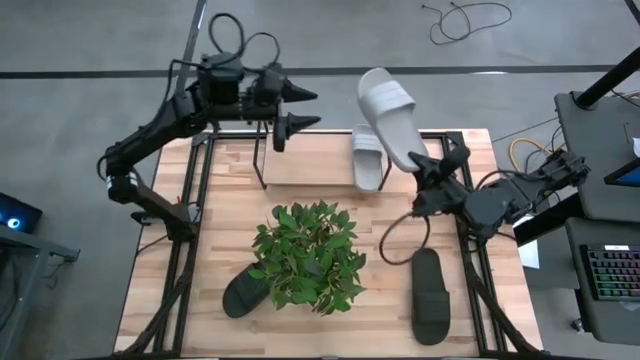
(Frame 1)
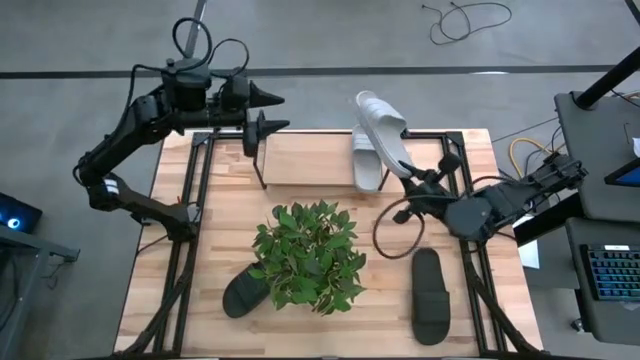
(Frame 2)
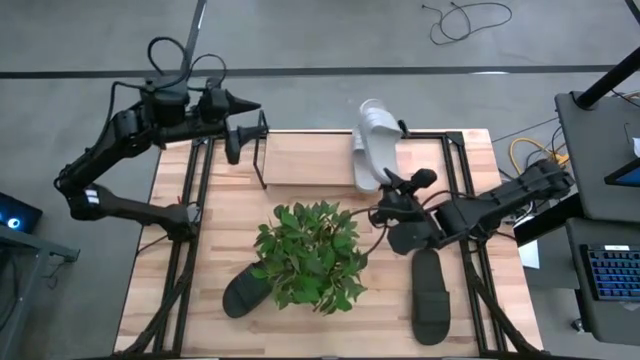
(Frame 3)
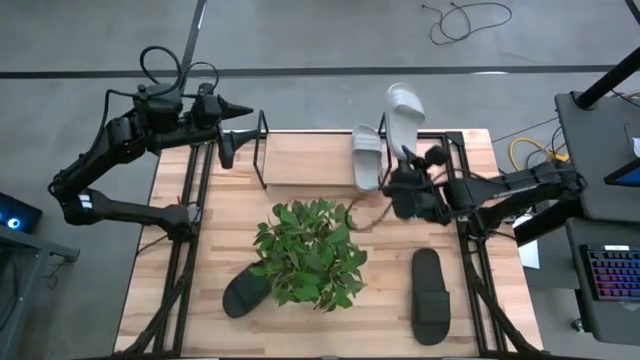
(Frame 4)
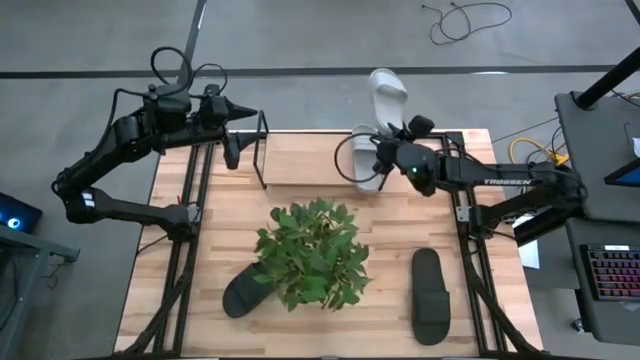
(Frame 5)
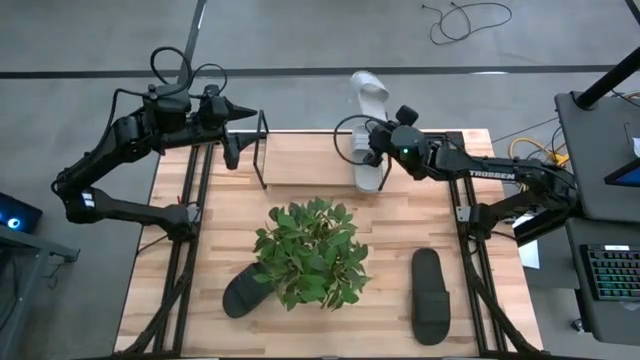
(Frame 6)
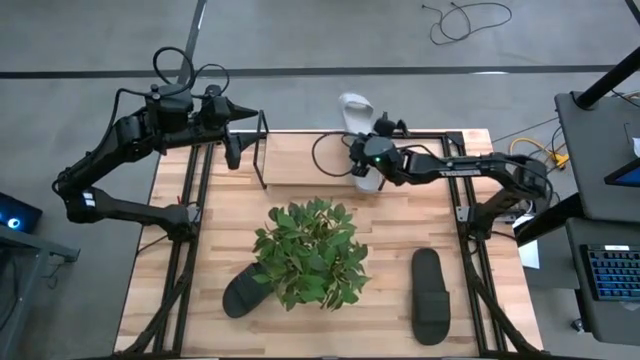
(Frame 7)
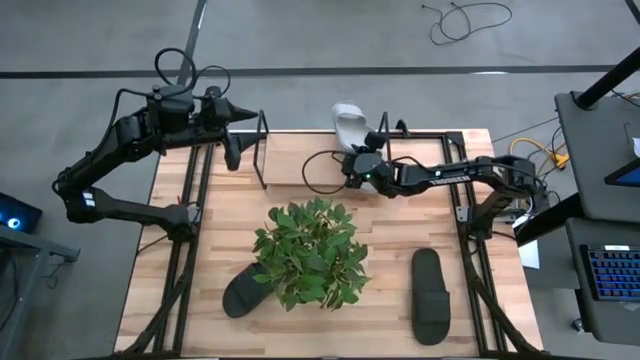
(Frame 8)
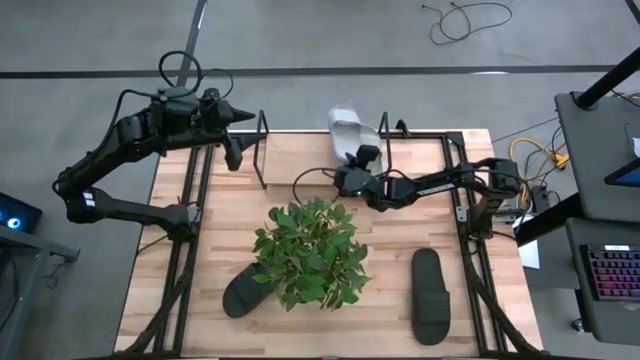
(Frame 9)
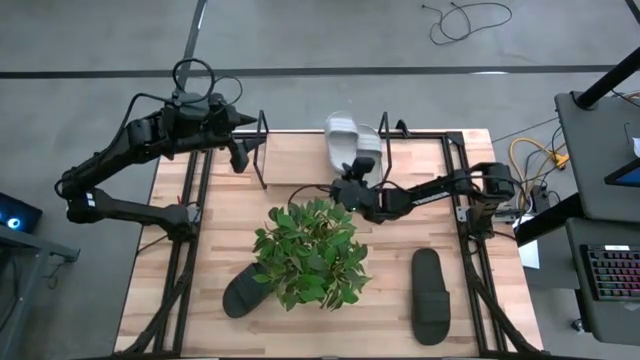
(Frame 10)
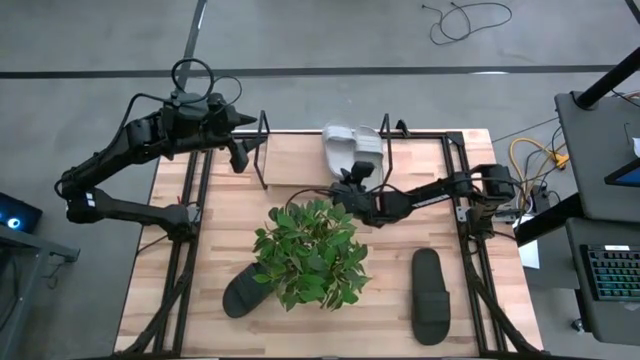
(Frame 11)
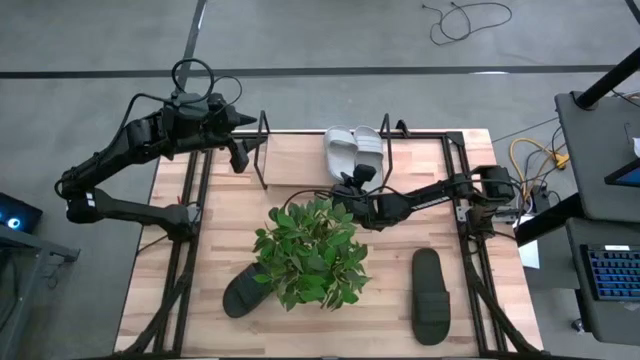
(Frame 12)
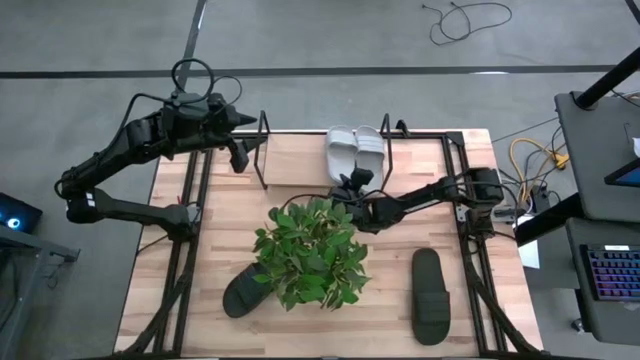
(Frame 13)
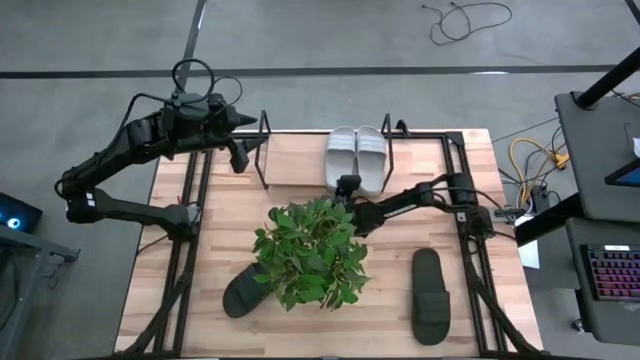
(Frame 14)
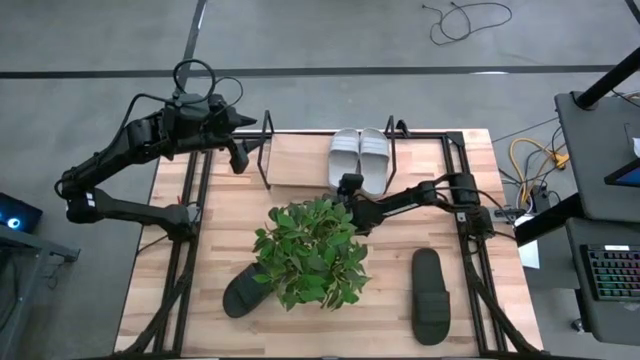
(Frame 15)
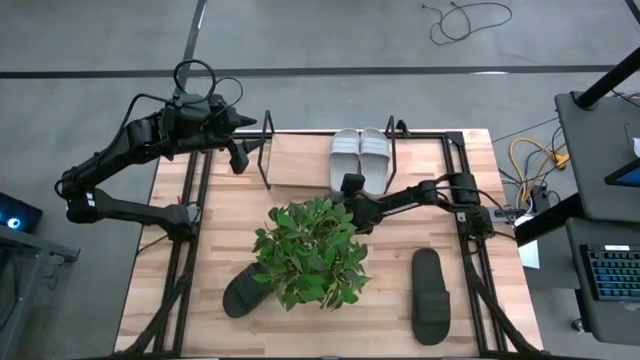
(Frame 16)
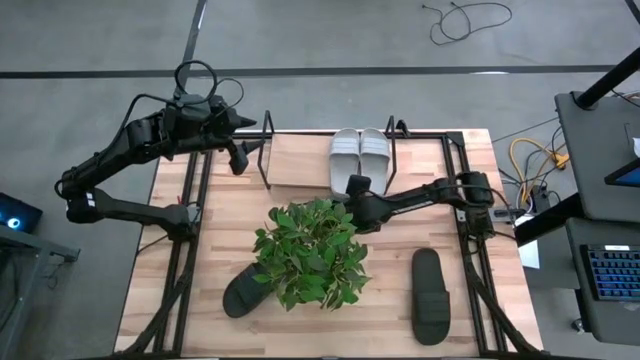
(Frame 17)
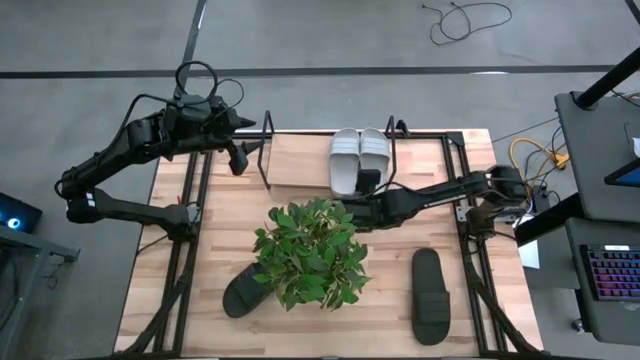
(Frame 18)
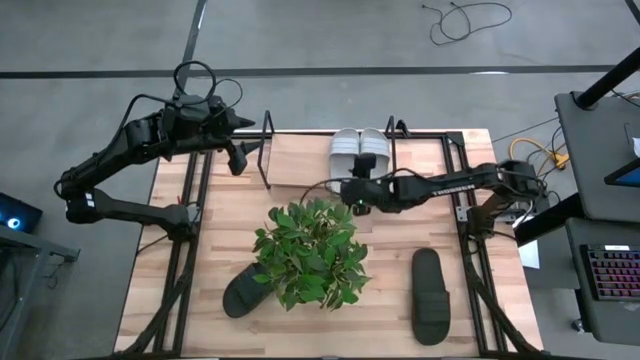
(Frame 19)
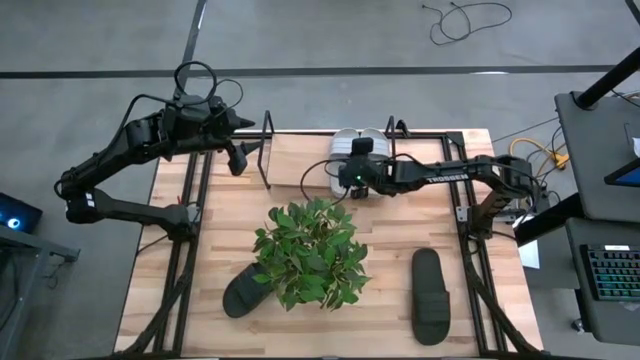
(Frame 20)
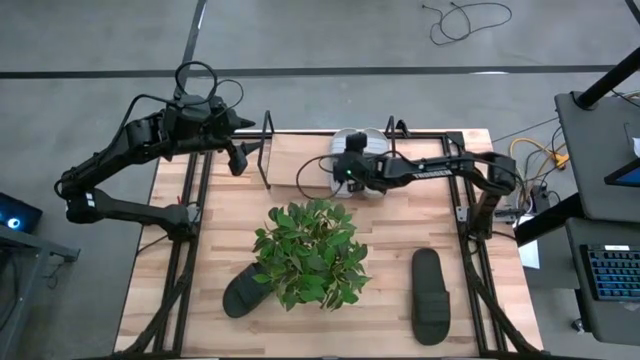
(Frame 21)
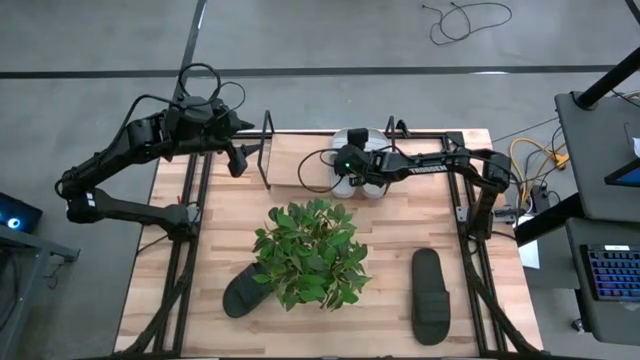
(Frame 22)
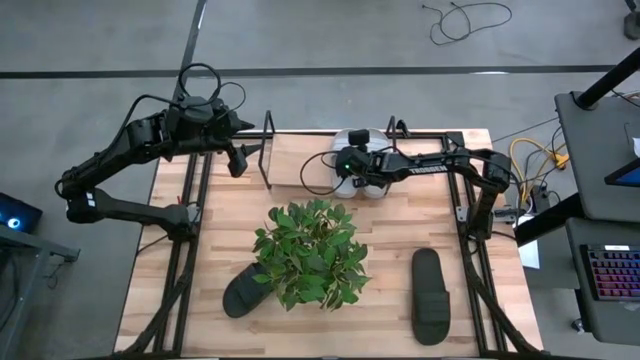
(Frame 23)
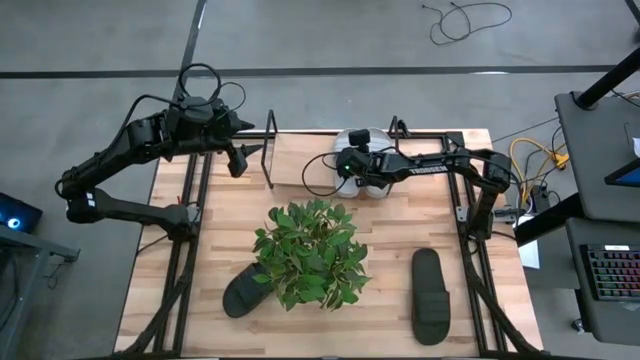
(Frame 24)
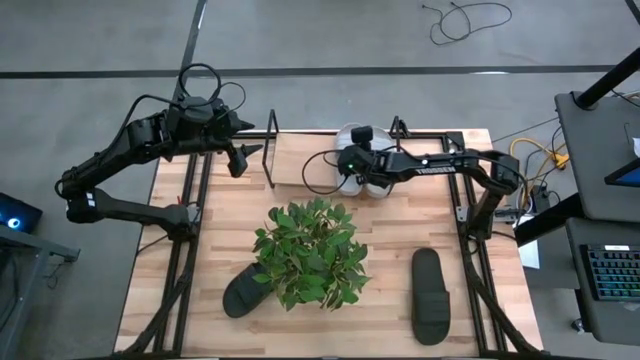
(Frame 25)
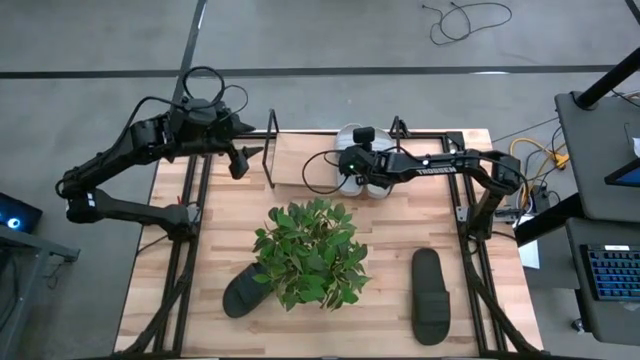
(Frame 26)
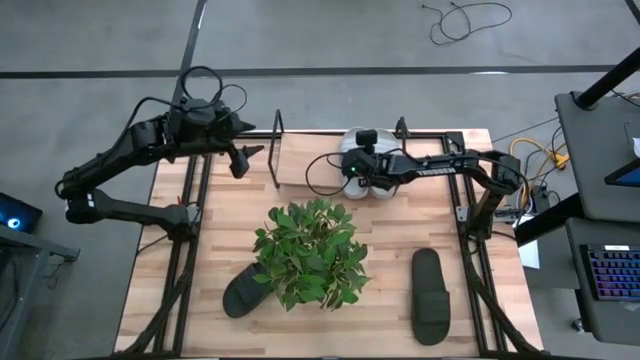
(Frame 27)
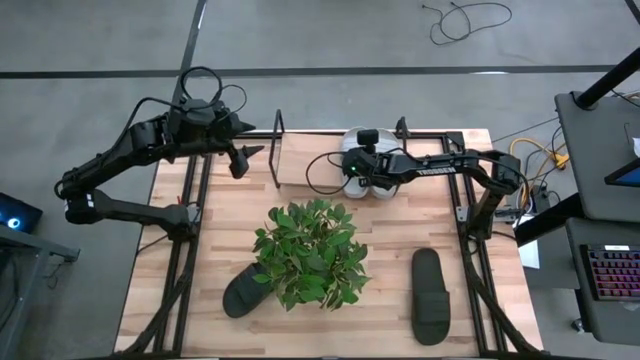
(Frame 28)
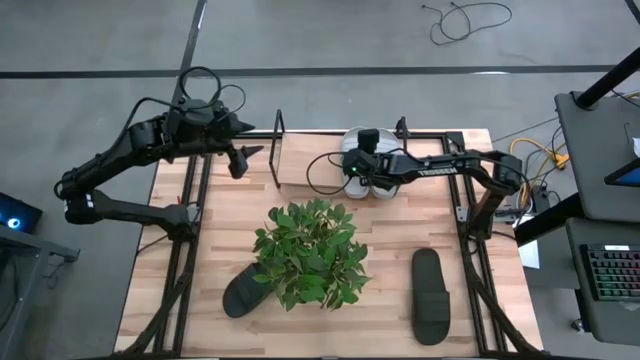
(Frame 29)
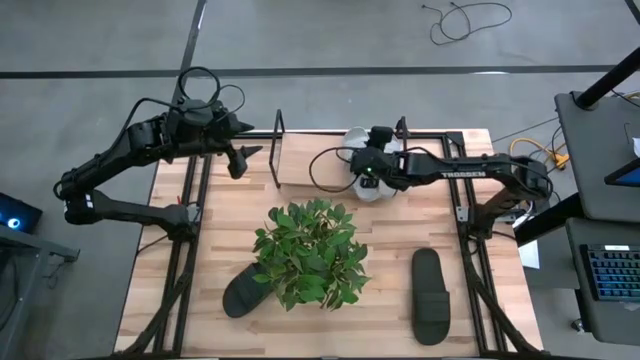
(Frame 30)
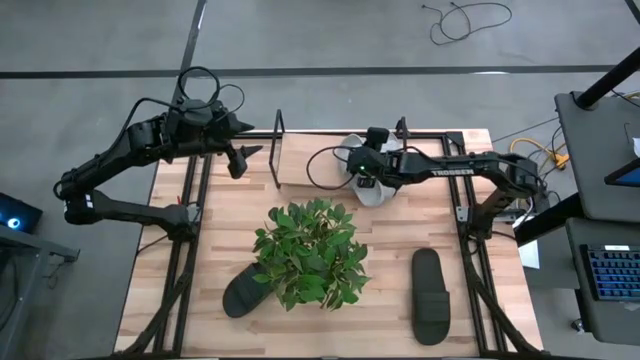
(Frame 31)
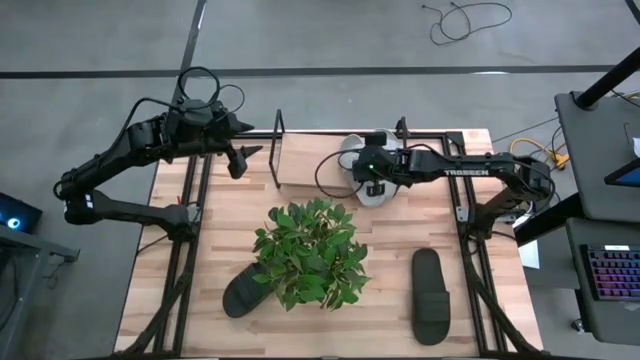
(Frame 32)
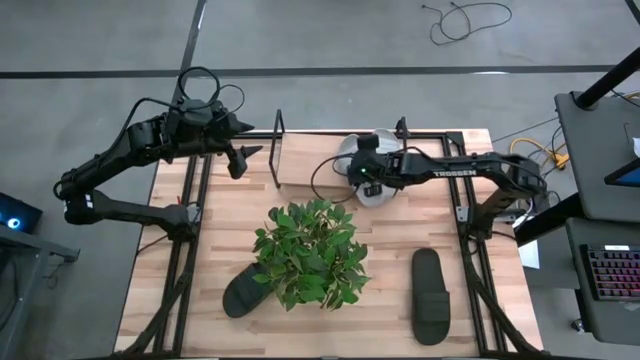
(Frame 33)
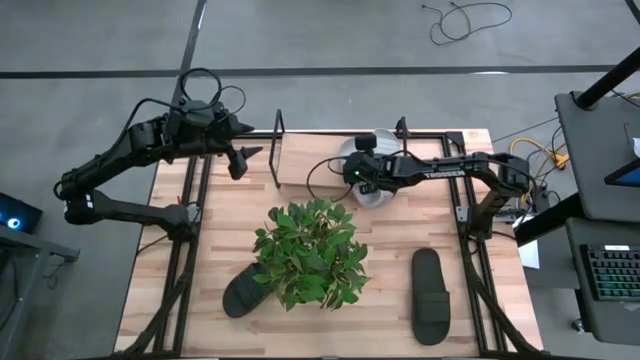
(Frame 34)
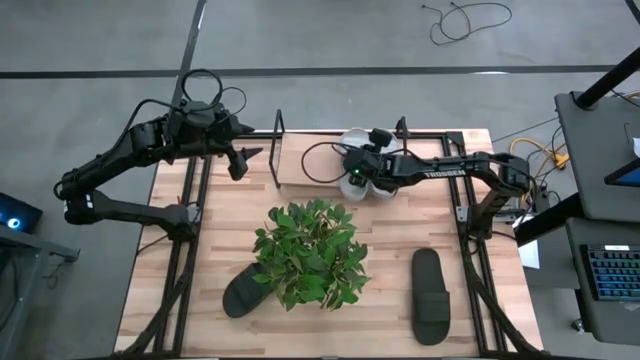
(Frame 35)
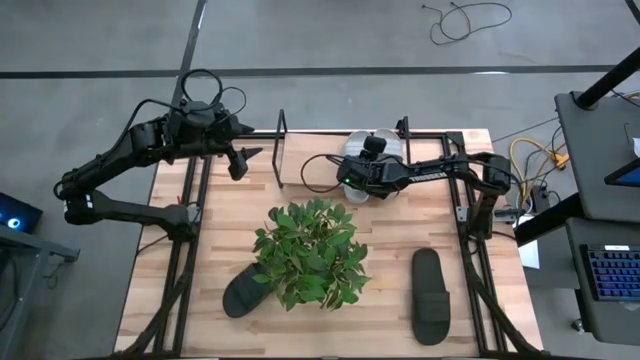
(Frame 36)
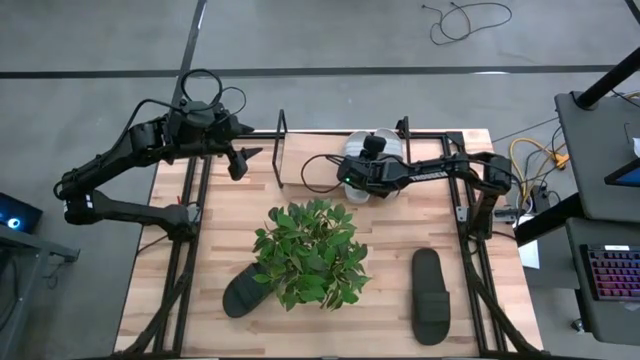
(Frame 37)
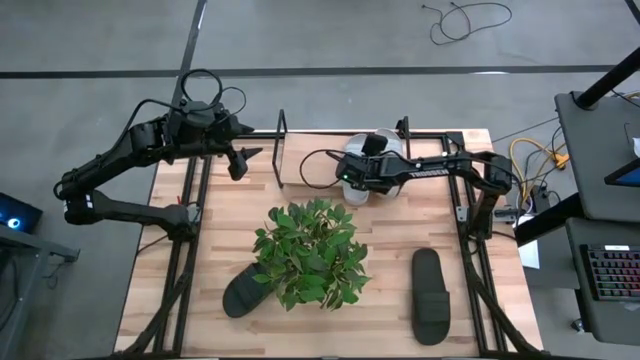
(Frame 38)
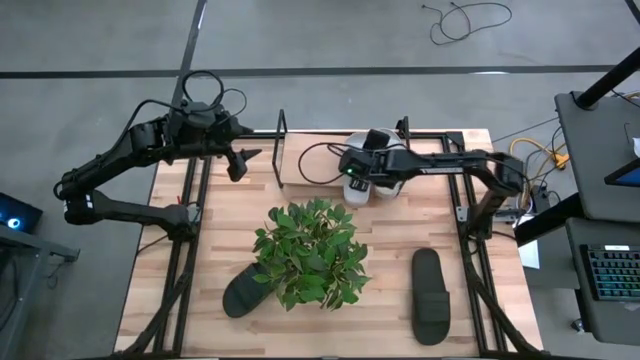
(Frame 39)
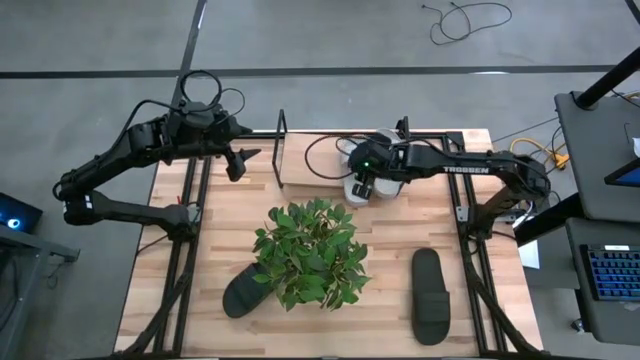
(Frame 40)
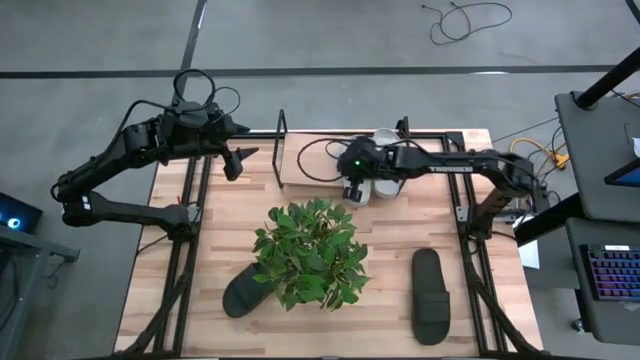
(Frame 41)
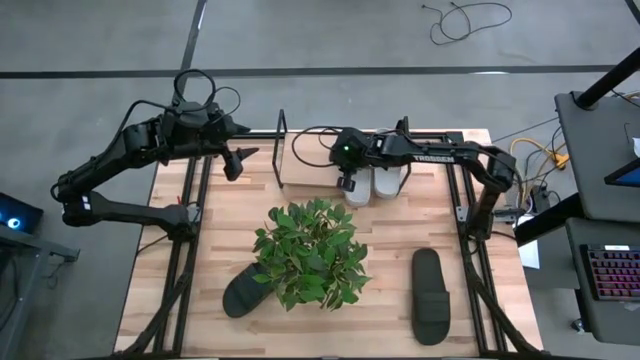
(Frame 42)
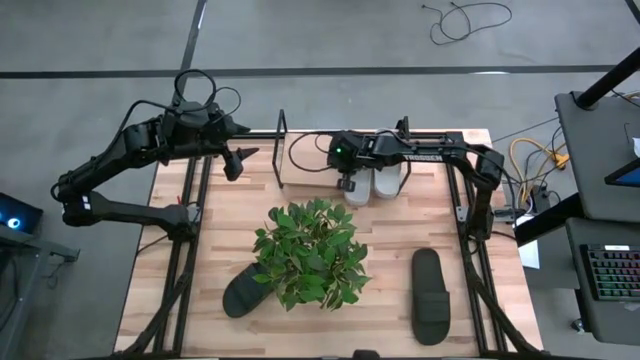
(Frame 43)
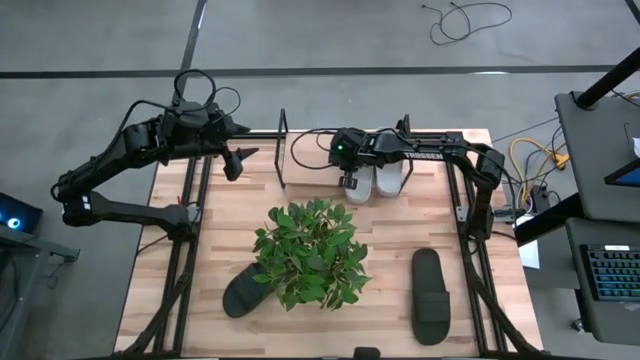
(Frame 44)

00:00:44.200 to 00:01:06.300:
Task: Pick and place slides into the shelf
Put the gray slide on the shelf
